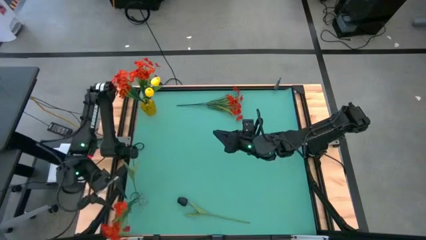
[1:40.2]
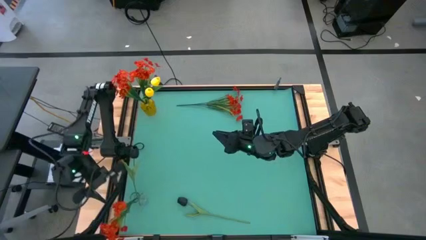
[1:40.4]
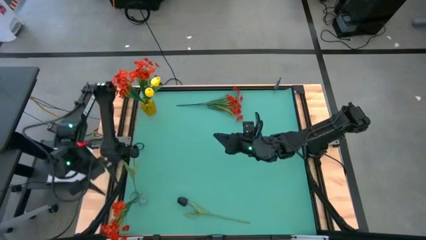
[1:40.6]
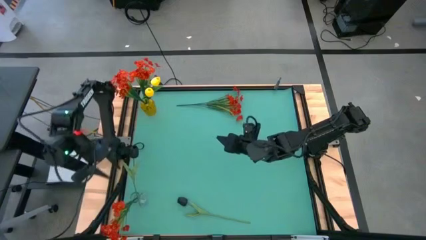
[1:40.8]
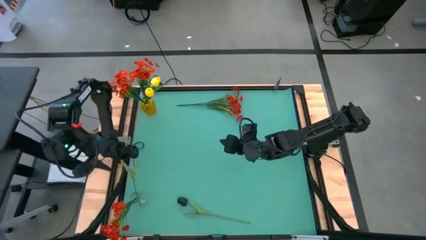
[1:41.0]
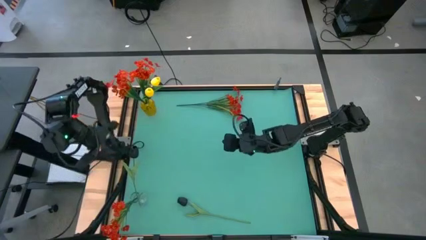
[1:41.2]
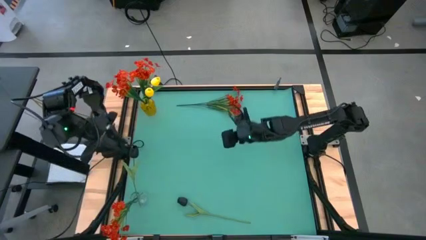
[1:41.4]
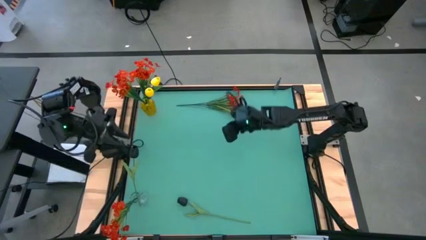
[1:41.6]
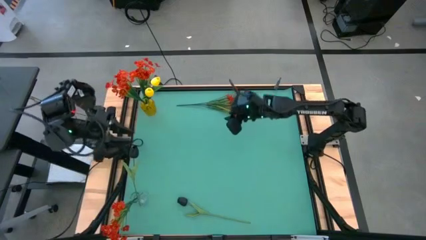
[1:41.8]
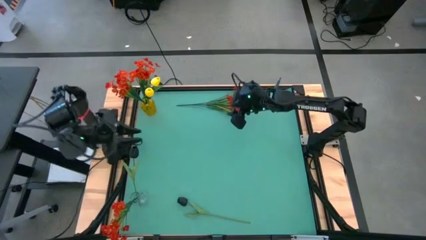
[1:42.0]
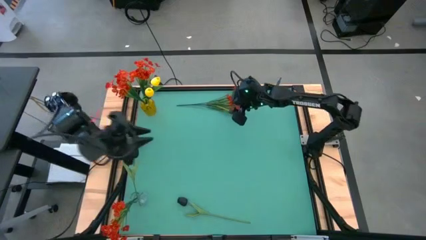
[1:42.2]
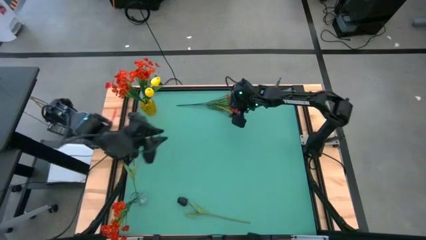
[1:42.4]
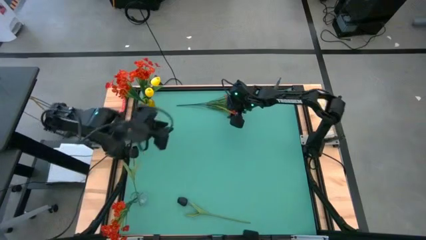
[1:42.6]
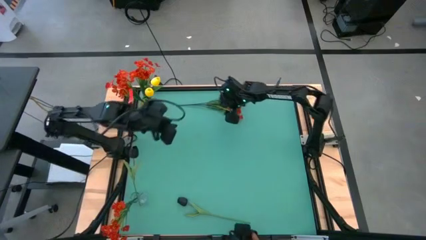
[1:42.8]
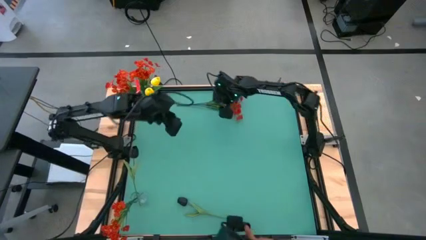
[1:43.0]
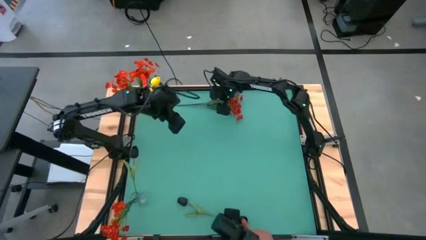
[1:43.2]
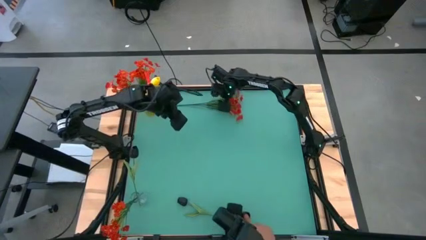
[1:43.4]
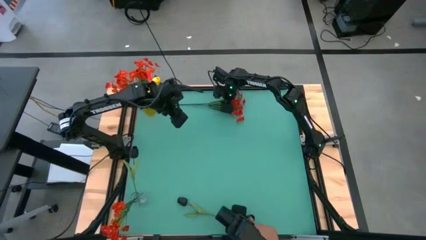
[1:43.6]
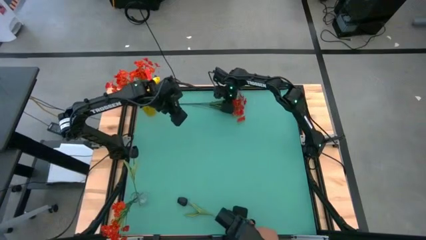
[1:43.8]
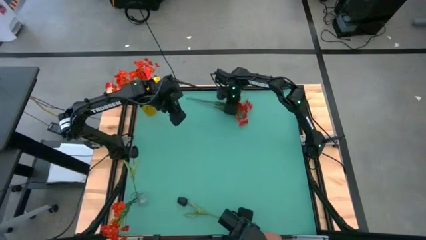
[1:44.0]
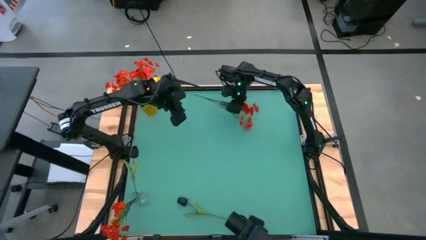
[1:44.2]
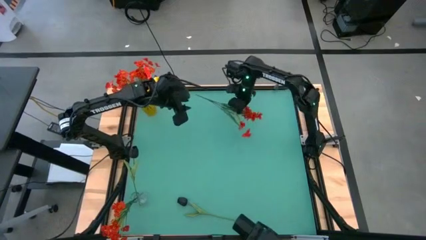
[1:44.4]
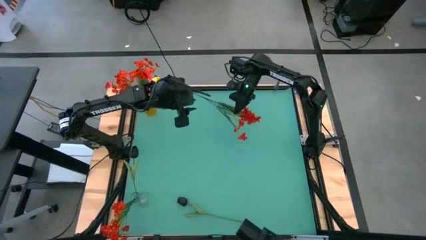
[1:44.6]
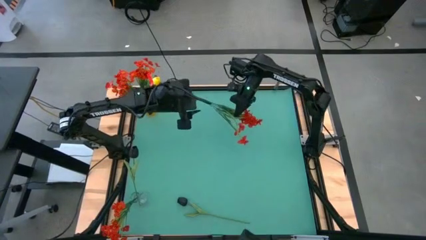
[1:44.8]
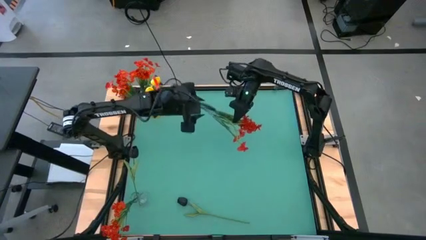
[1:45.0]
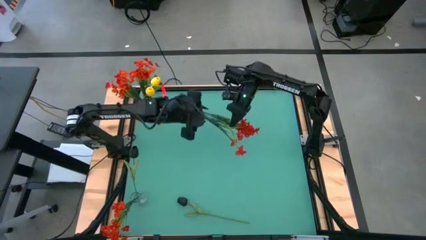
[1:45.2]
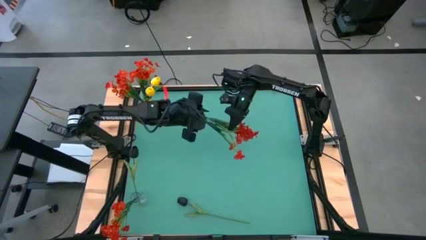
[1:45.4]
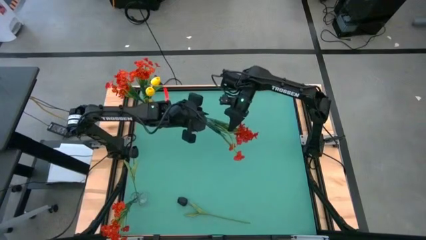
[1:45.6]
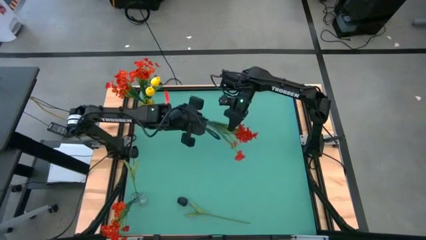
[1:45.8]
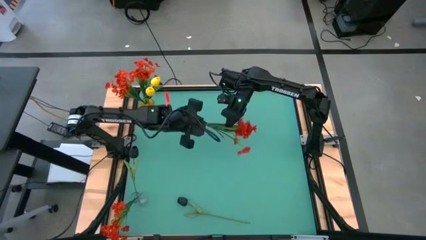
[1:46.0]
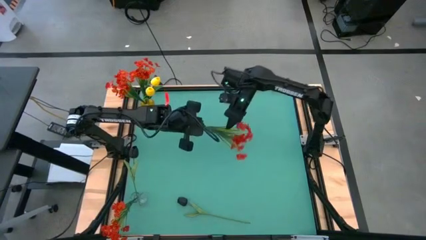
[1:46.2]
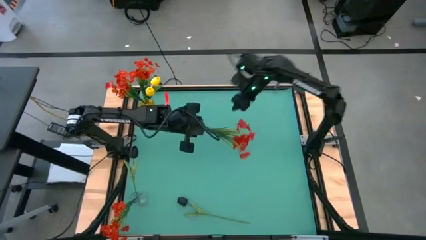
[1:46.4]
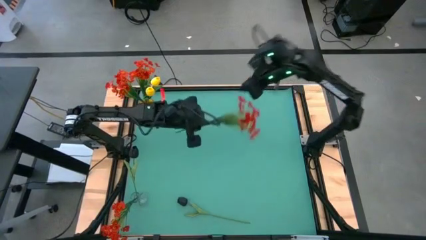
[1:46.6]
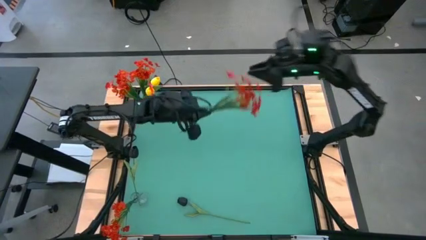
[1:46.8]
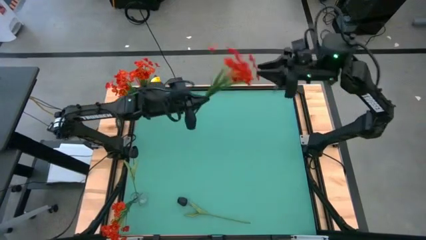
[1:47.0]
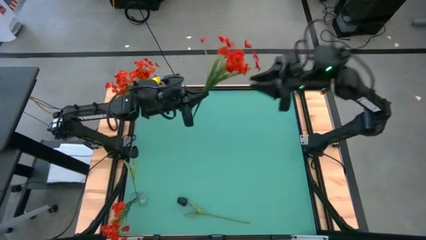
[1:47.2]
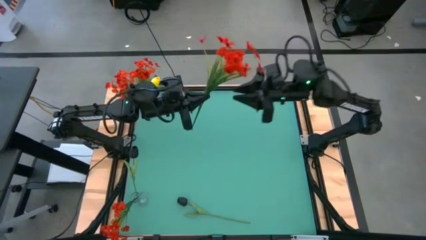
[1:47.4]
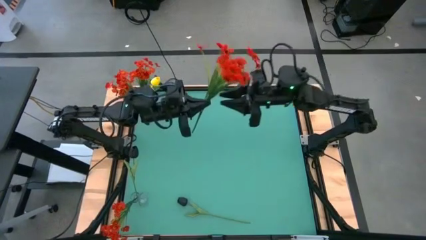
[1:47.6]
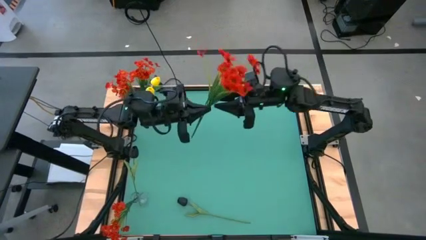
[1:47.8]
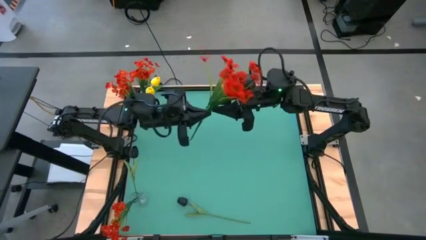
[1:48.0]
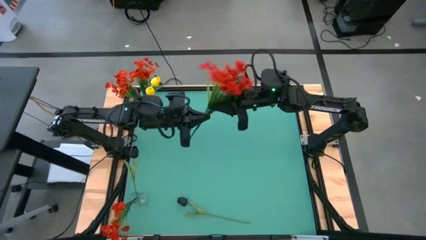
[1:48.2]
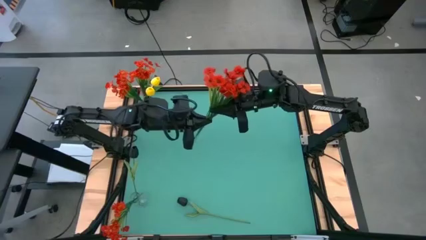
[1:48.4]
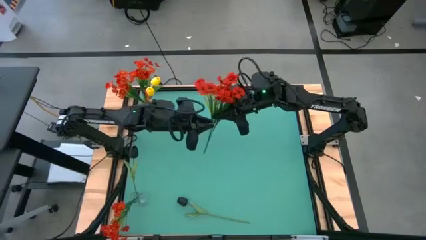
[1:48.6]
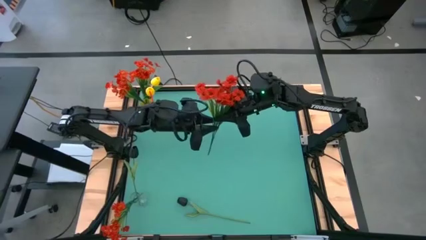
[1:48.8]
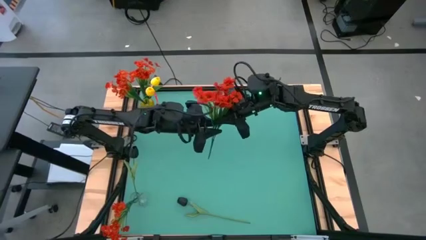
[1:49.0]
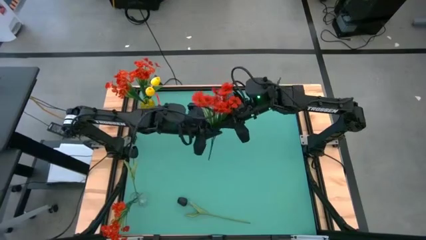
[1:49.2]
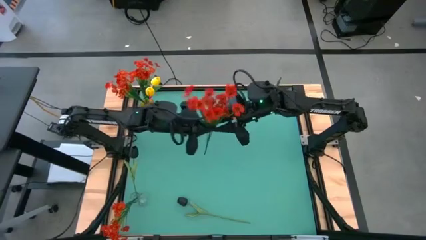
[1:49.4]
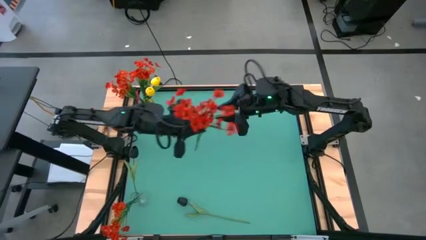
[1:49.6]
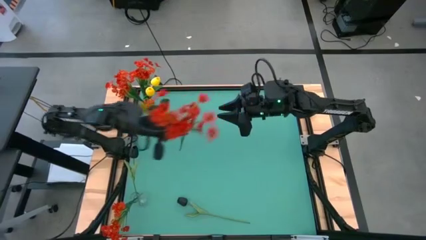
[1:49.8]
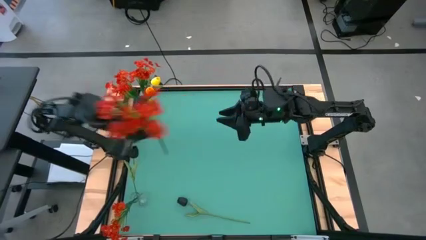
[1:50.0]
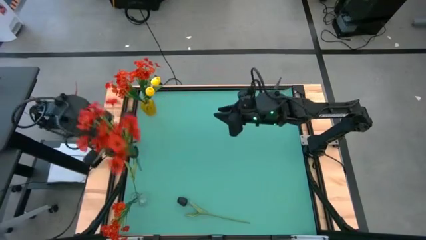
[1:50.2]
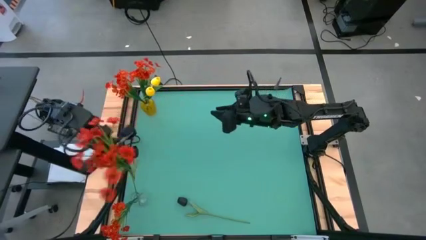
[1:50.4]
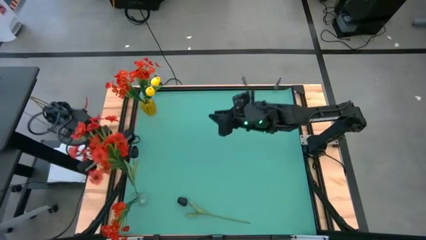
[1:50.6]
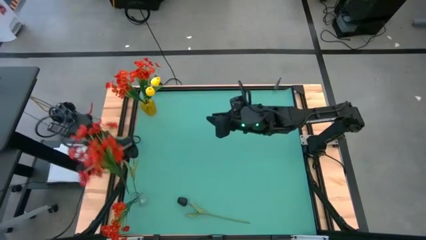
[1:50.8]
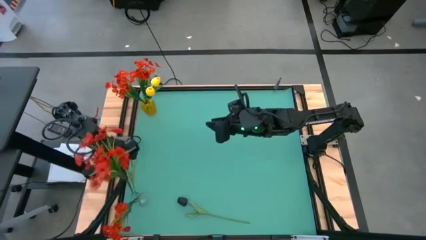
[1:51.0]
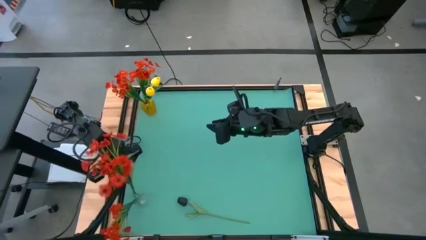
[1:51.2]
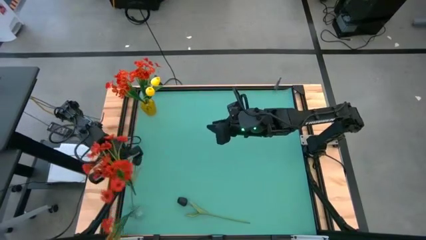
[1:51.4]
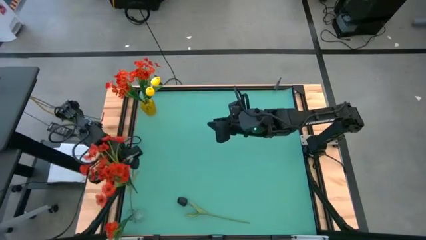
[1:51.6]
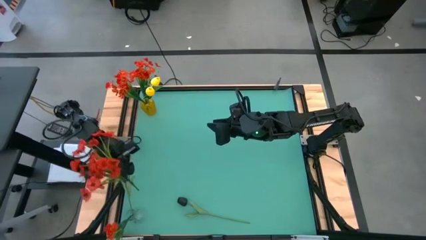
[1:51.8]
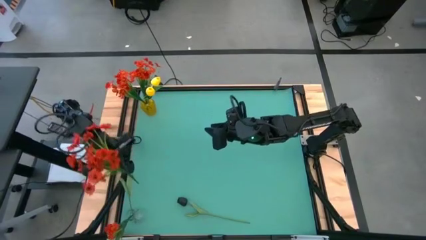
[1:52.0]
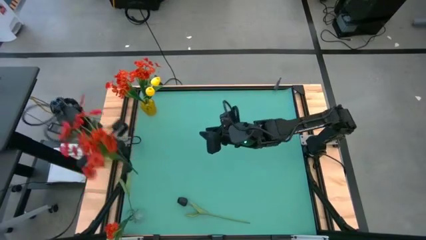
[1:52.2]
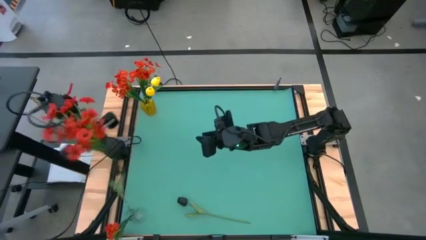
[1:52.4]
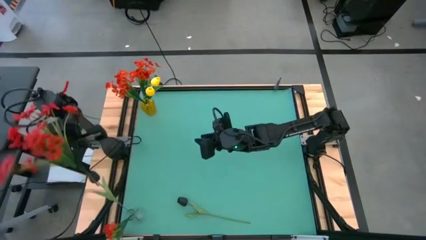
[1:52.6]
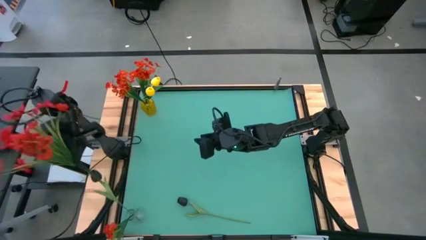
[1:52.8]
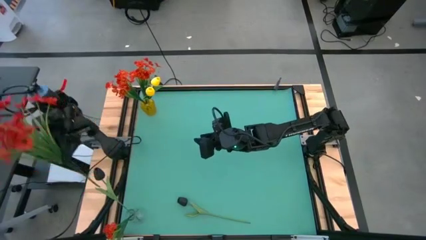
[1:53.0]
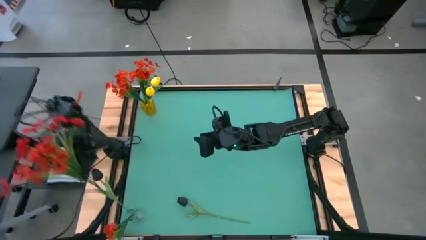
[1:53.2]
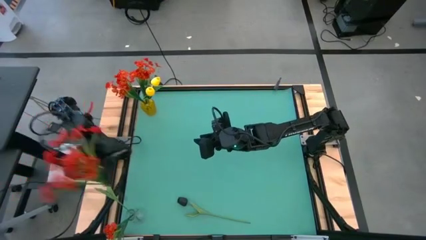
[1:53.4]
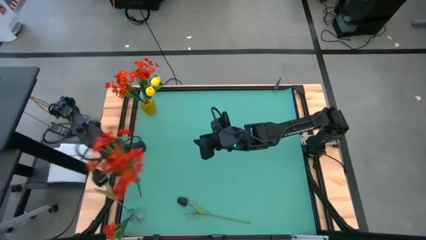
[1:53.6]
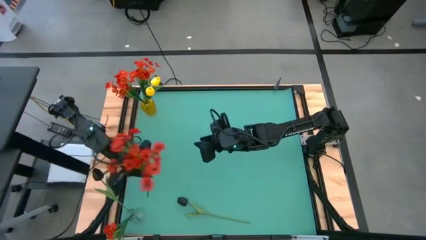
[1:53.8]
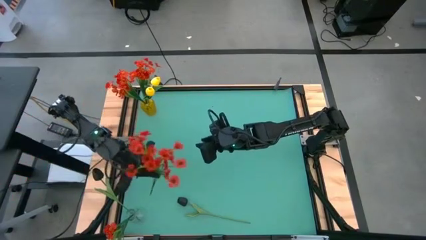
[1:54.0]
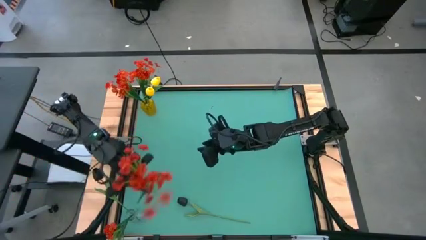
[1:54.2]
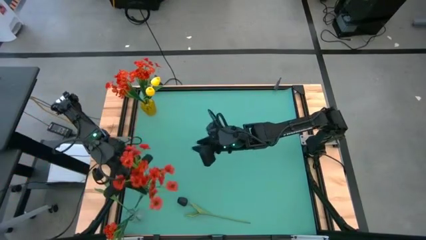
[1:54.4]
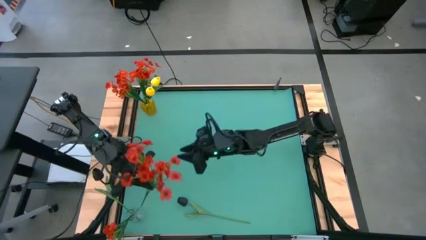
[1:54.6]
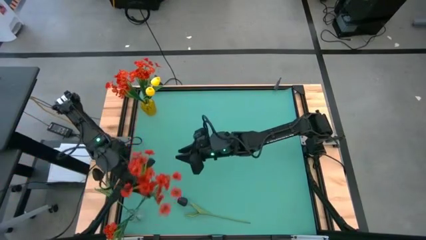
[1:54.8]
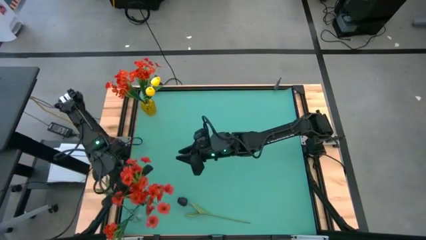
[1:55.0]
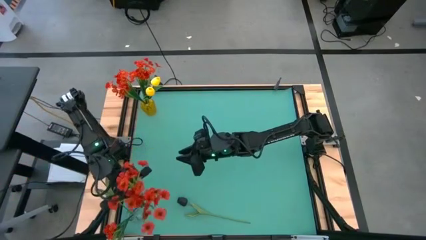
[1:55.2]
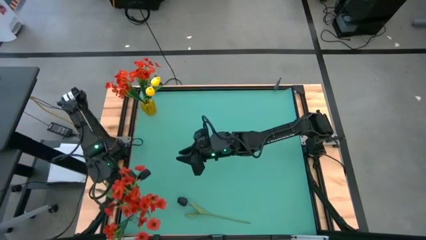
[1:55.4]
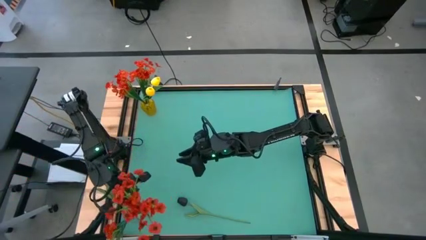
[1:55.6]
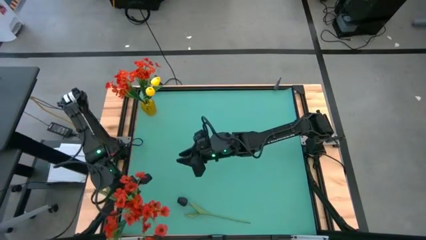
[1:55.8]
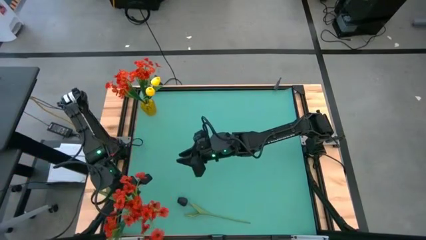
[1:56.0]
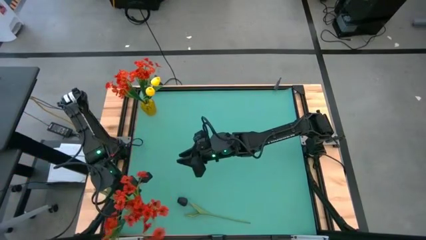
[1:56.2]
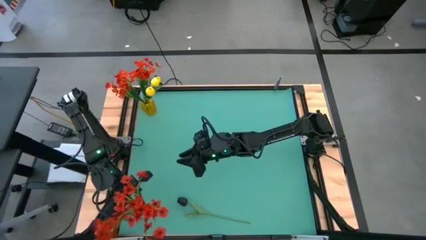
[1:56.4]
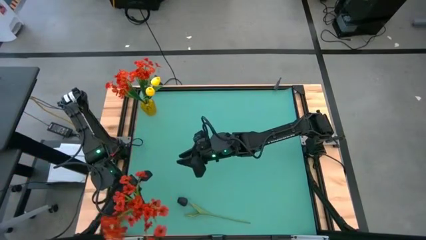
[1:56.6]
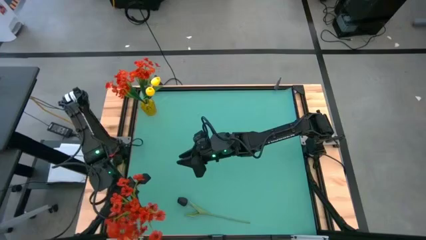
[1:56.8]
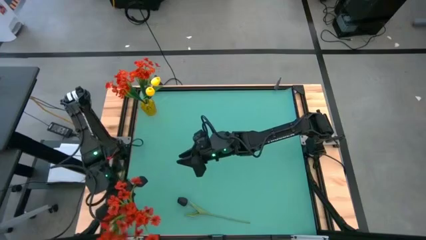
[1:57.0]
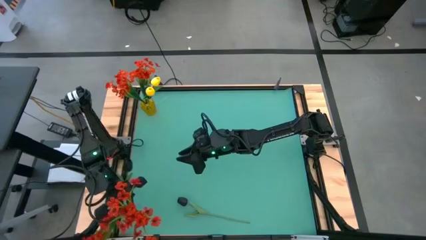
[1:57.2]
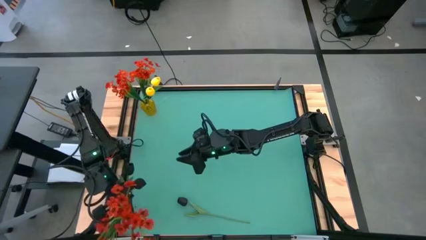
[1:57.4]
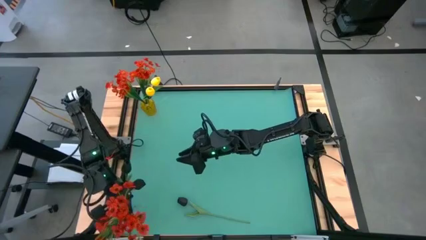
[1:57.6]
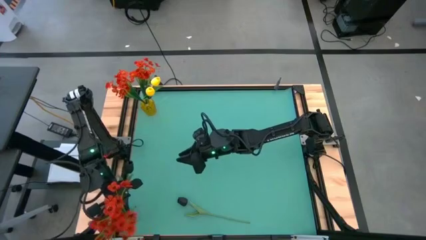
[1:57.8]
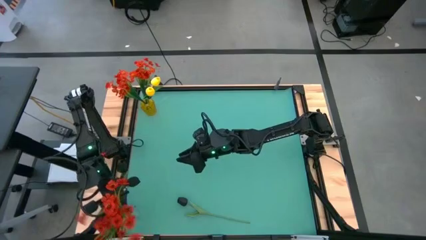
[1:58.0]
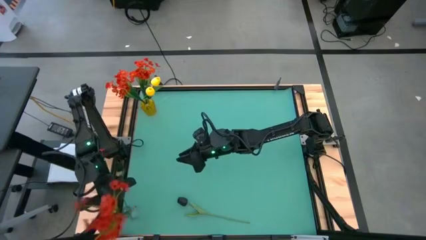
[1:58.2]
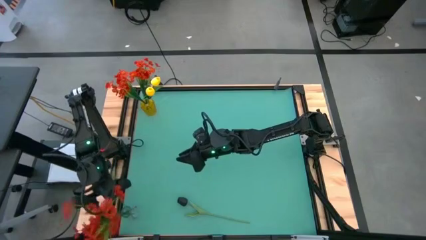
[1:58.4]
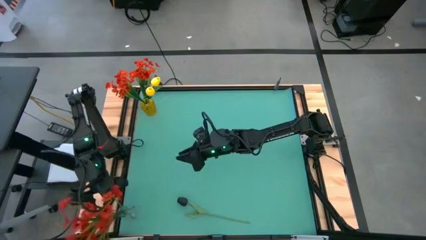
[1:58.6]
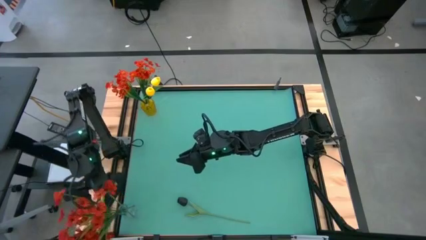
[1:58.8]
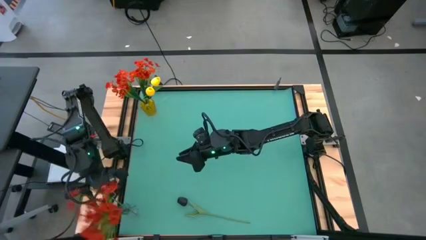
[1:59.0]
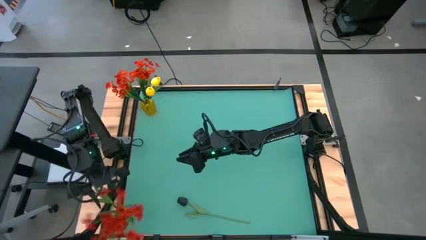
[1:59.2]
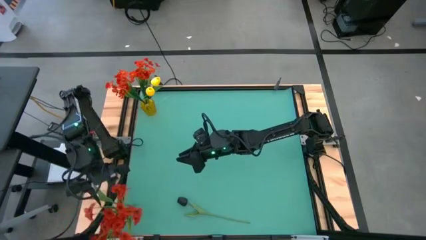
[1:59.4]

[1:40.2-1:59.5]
Task: Sort flowers into vase by color
Put the orange flowers into the transparent vase
